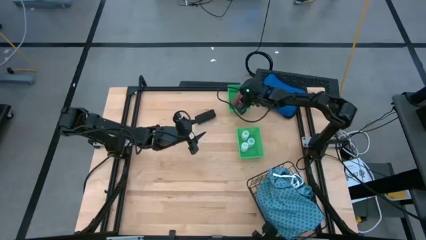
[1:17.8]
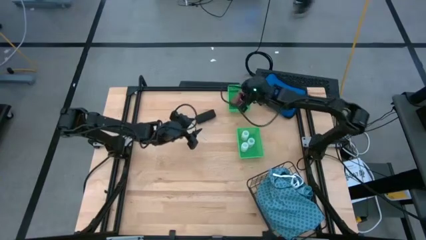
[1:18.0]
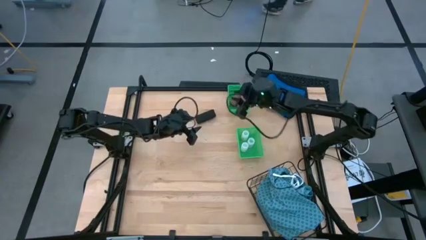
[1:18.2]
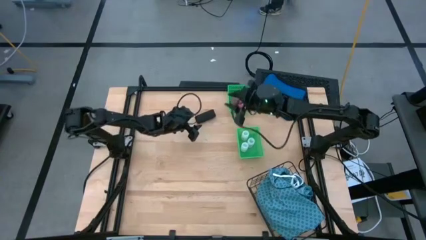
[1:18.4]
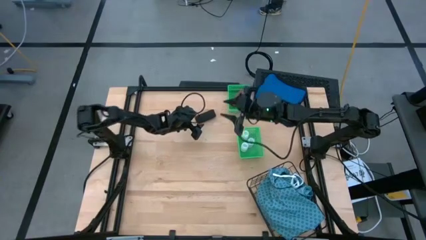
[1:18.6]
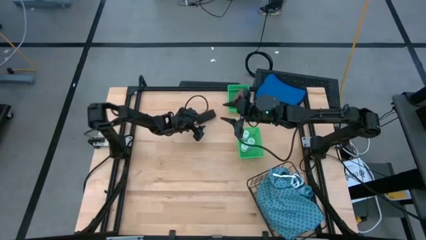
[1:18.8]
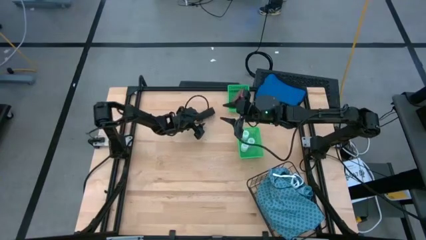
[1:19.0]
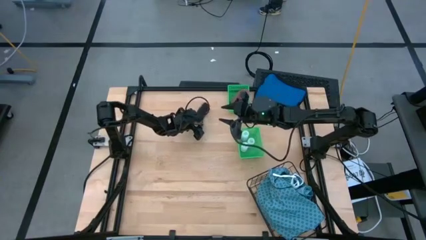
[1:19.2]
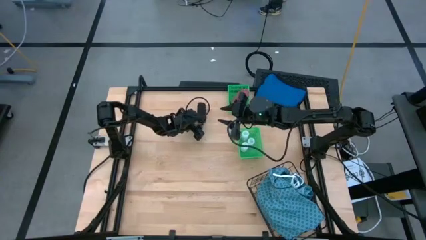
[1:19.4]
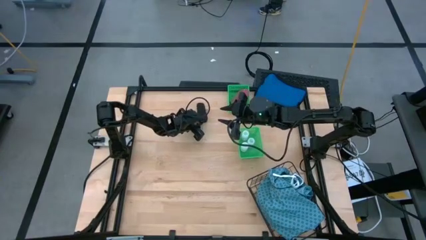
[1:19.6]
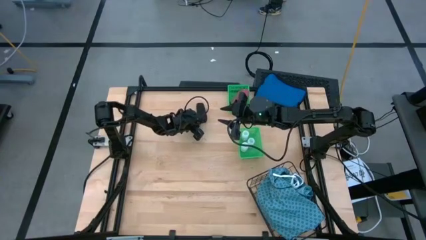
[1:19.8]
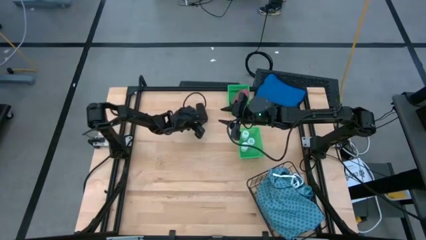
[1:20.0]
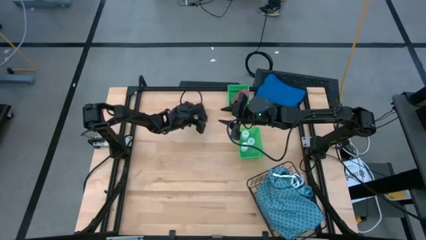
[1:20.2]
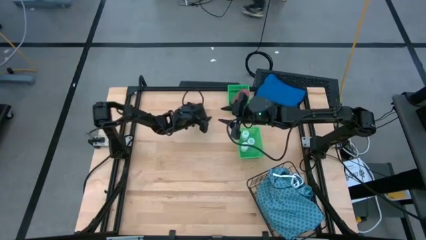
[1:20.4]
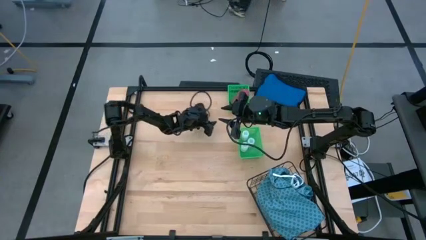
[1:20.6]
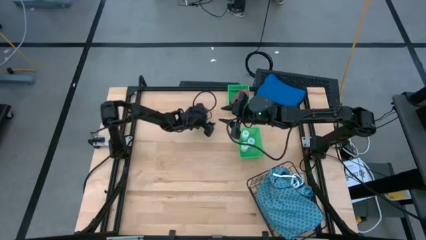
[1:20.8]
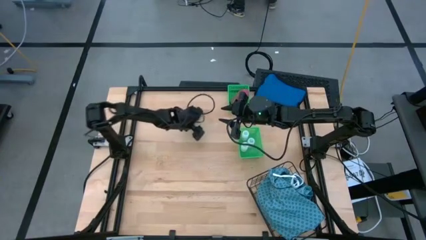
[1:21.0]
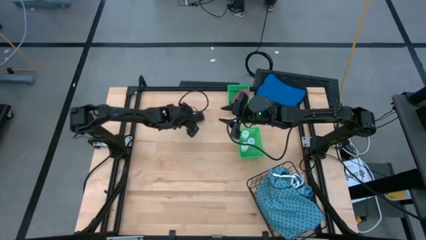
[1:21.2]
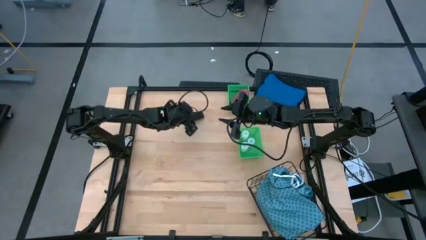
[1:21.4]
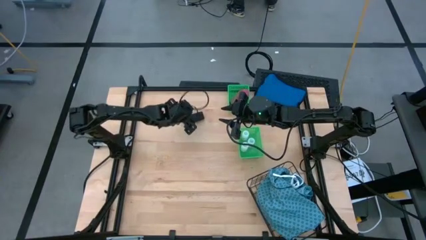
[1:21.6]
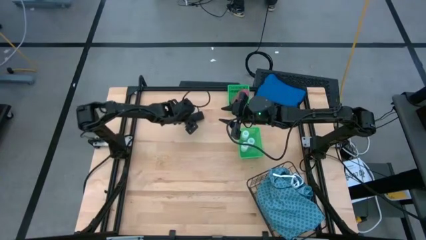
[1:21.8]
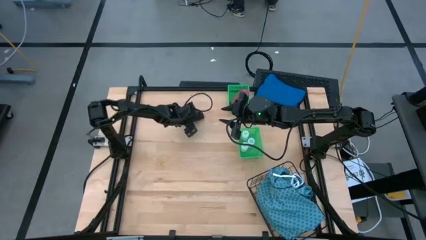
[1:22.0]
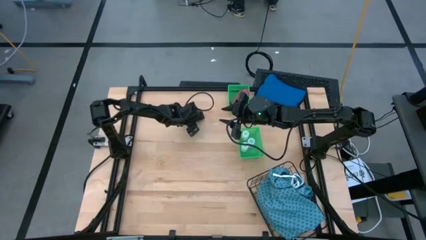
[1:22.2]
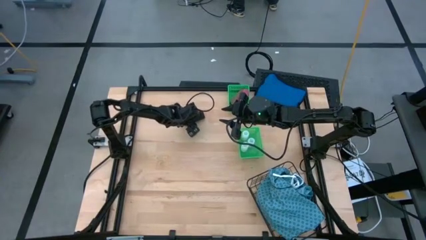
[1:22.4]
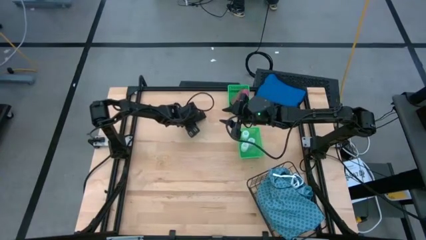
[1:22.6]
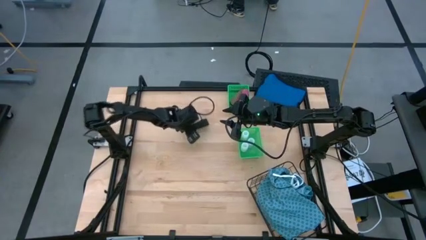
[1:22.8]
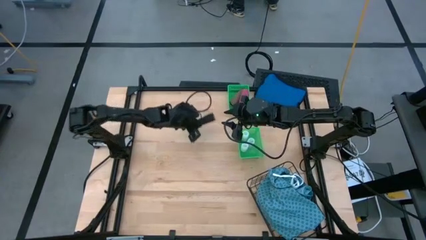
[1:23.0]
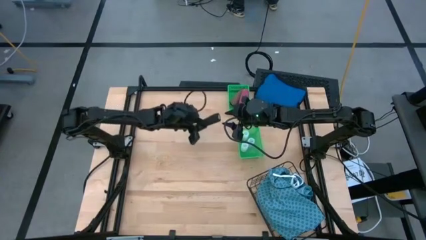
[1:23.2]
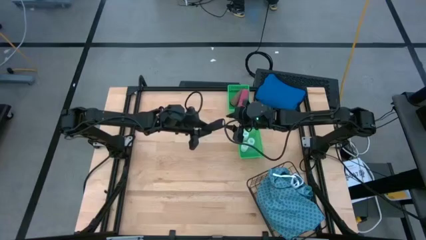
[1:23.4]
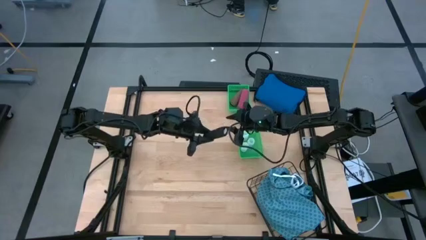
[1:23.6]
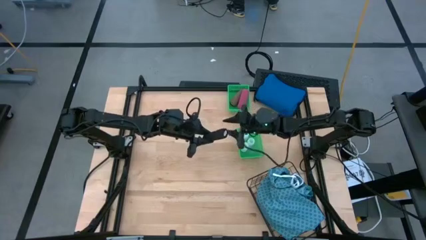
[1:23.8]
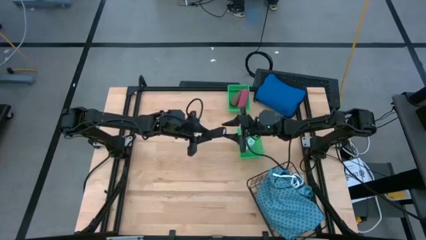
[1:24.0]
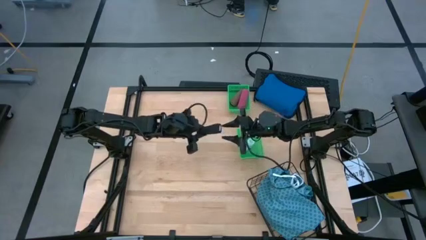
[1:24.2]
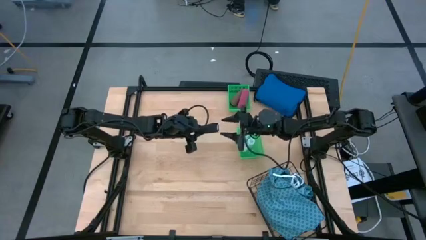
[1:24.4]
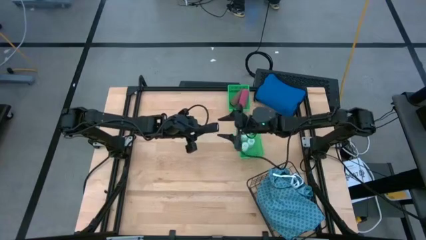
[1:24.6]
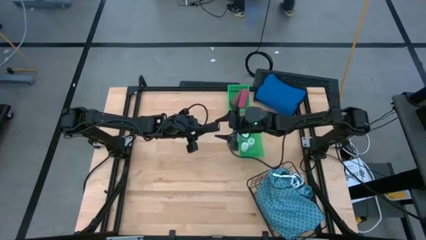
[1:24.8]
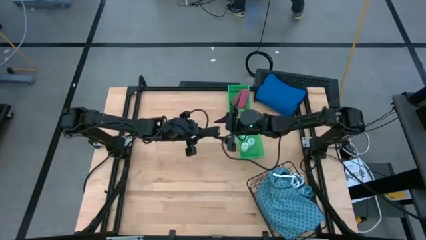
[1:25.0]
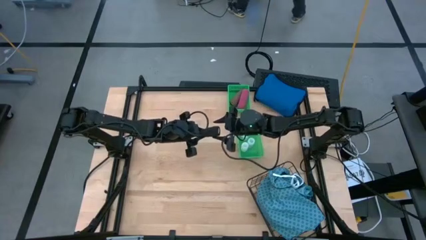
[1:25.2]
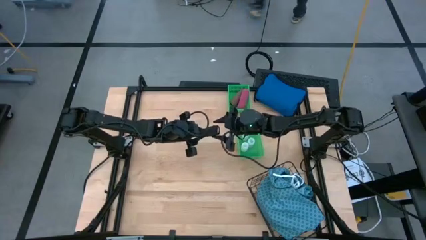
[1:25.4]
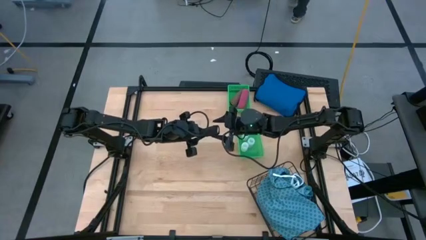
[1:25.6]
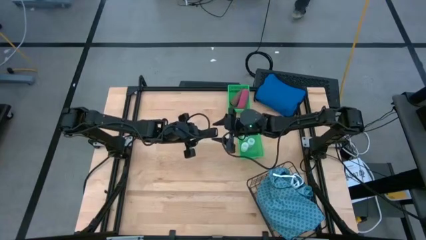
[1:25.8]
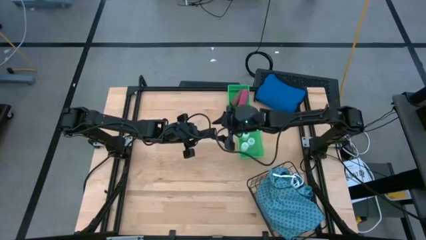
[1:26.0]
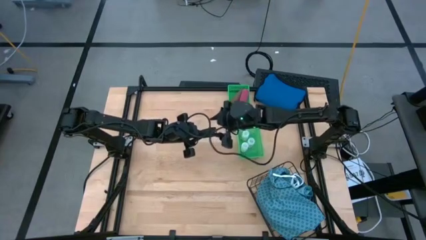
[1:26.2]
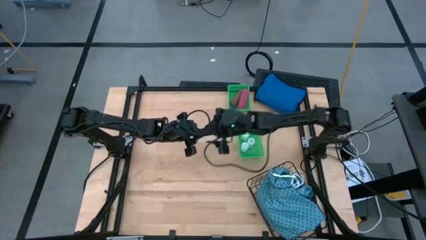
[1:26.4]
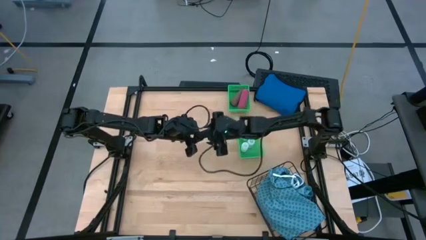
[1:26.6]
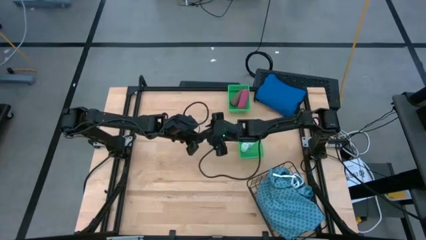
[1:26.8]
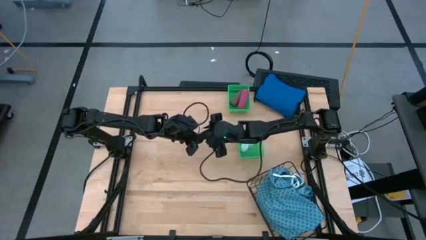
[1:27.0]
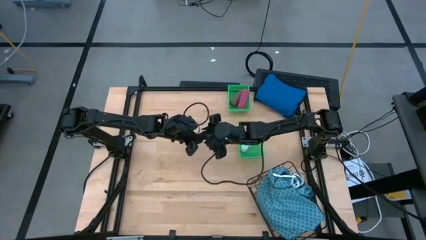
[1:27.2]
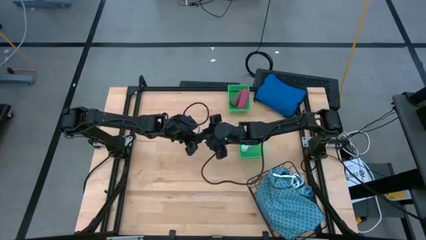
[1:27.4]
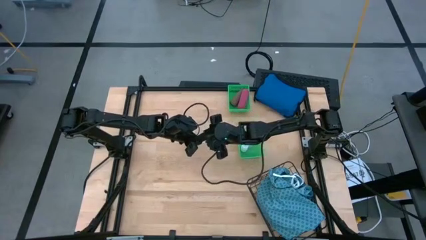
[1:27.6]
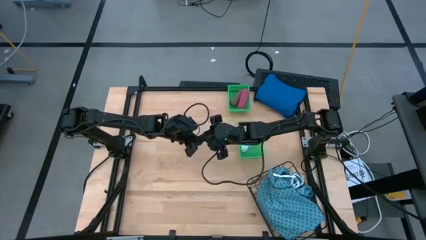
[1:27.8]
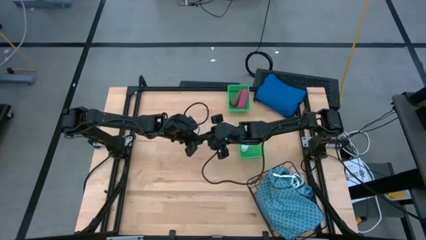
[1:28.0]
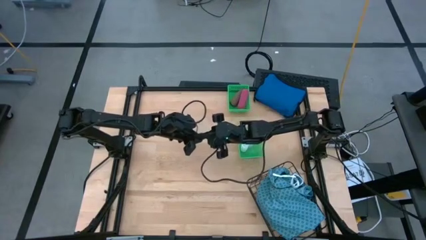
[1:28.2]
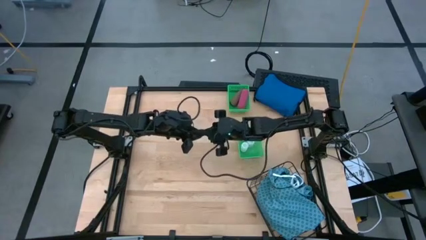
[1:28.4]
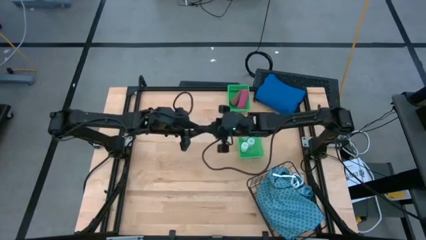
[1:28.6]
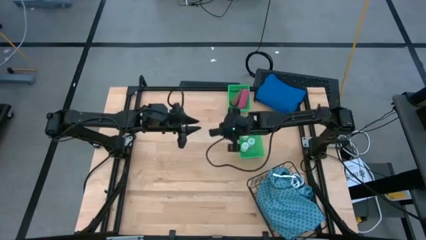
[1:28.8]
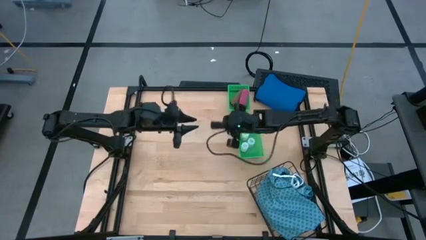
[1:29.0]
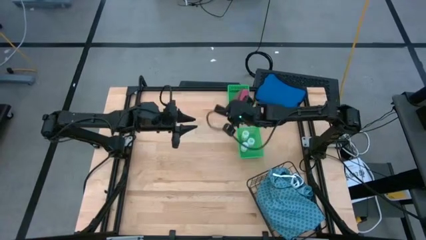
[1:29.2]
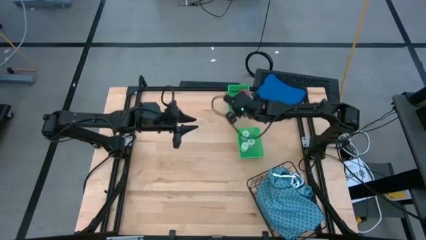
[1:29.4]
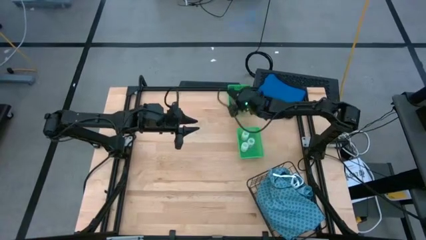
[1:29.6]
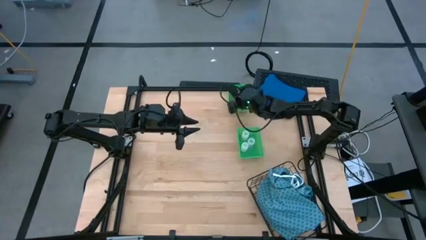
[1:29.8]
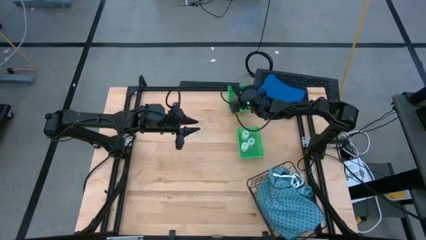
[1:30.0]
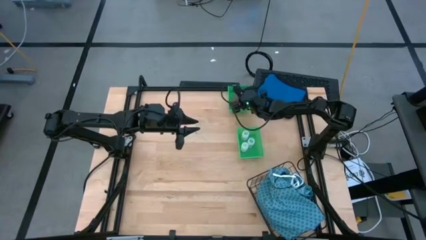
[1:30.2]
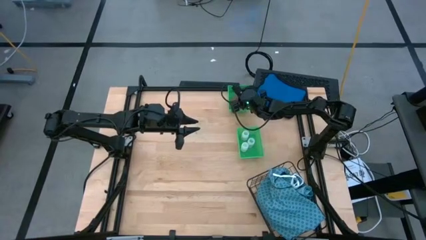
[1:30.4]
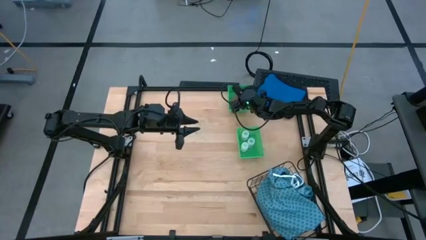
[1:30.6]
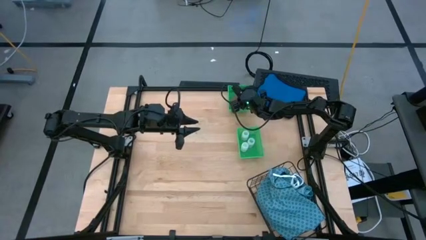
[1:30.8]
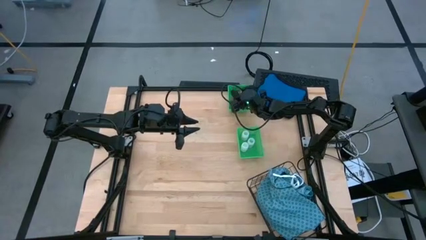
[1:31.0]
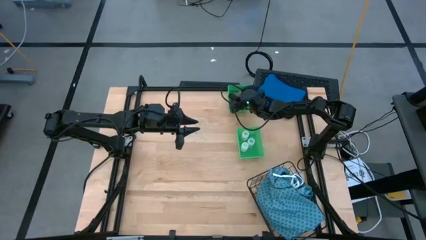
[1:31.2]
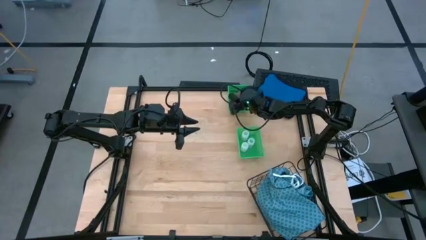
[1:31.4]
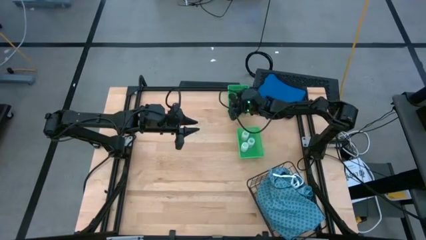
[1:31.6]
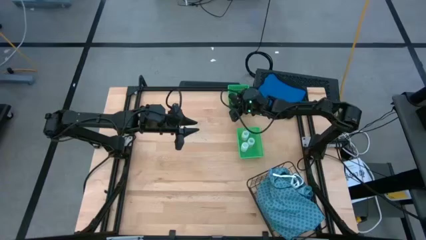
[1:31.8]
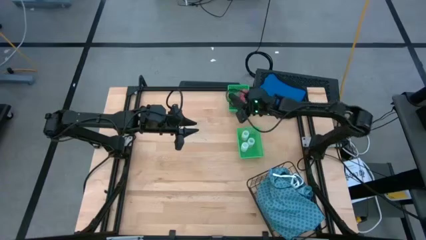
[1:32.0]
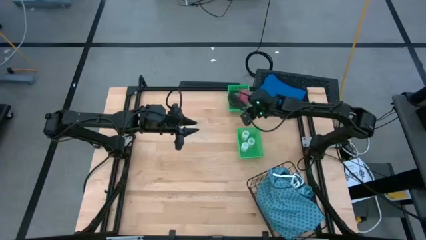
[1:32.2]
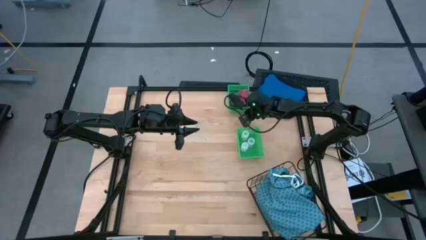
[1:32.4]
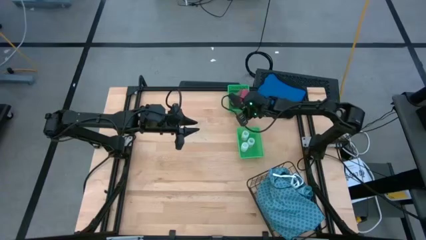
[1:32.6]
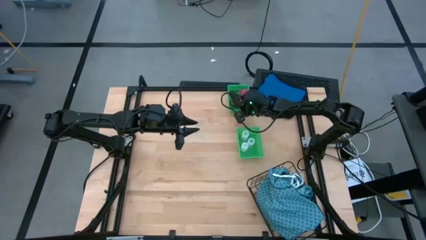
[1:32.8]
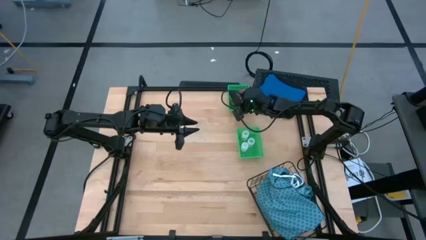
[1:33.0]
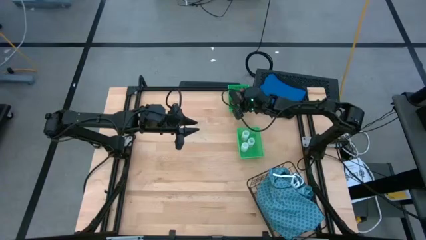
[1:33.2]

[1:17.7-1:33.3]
Task: Pick & Place Medicine items
Put the black bandage into the top green bin
